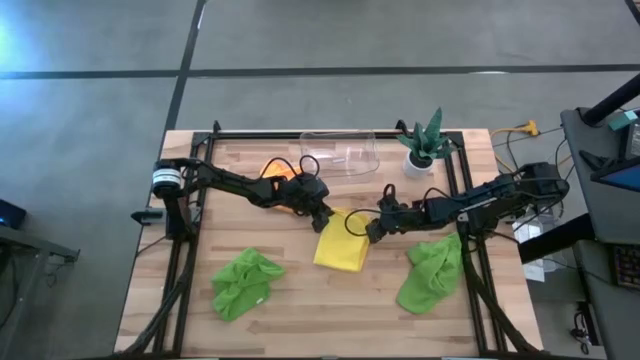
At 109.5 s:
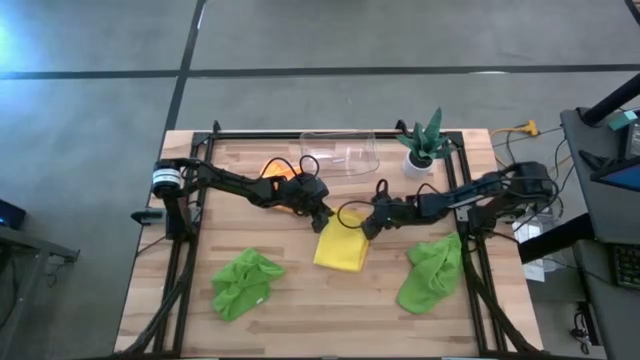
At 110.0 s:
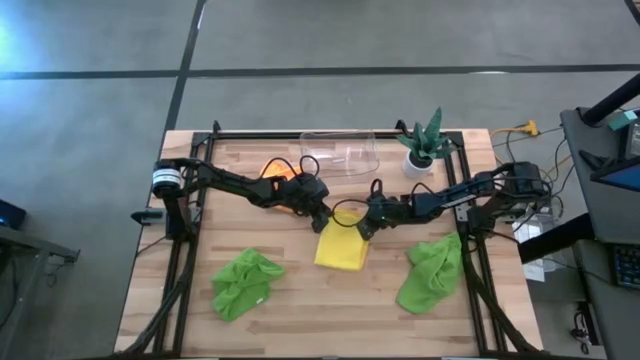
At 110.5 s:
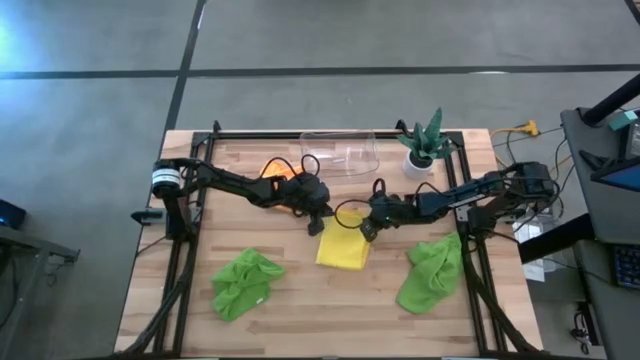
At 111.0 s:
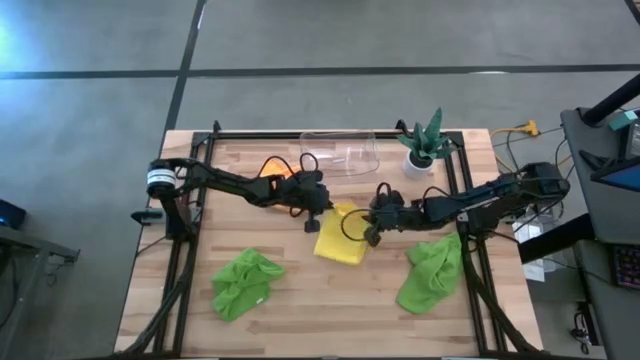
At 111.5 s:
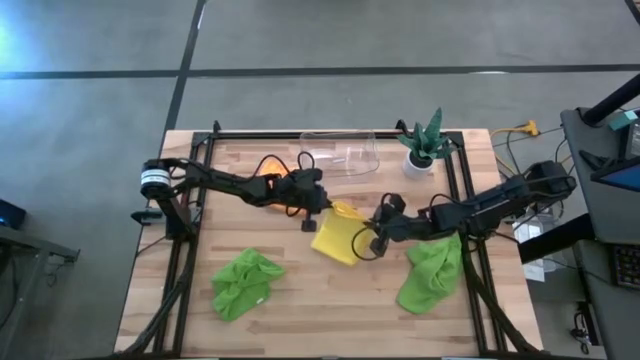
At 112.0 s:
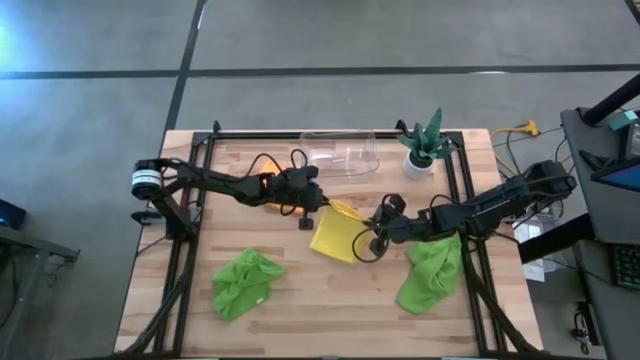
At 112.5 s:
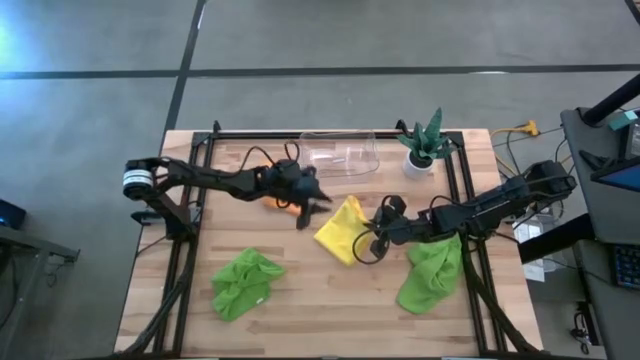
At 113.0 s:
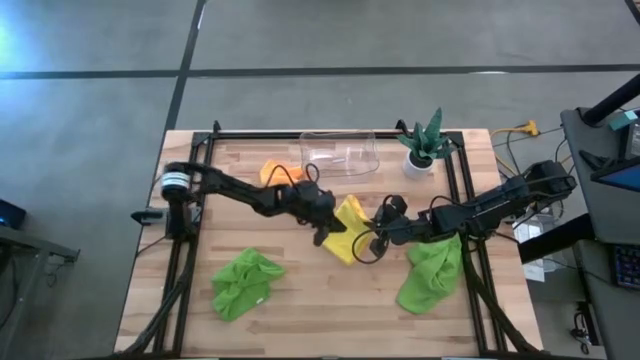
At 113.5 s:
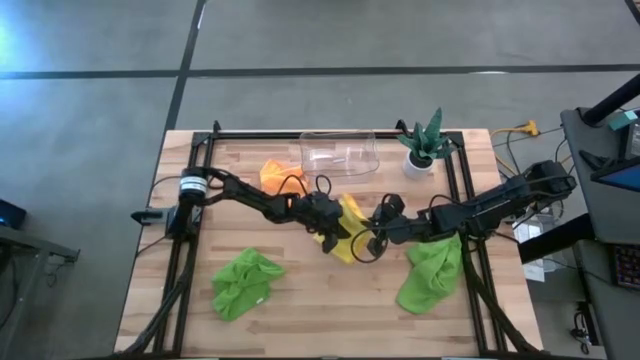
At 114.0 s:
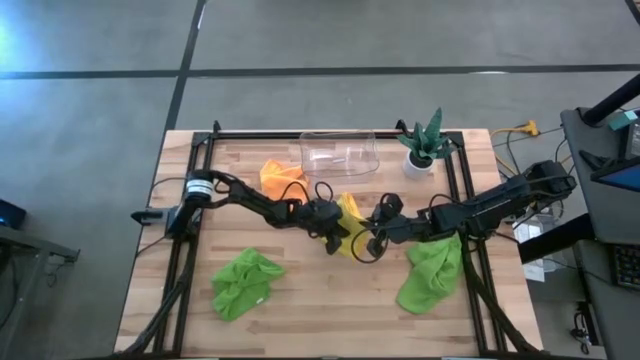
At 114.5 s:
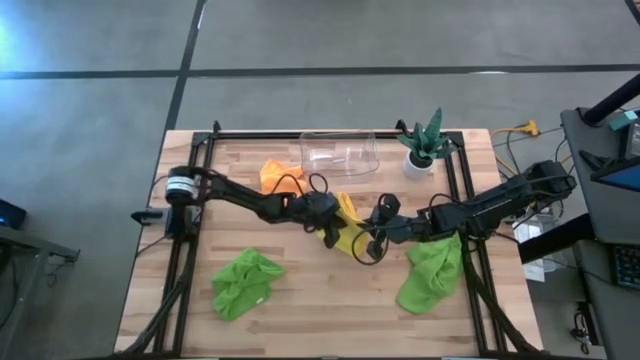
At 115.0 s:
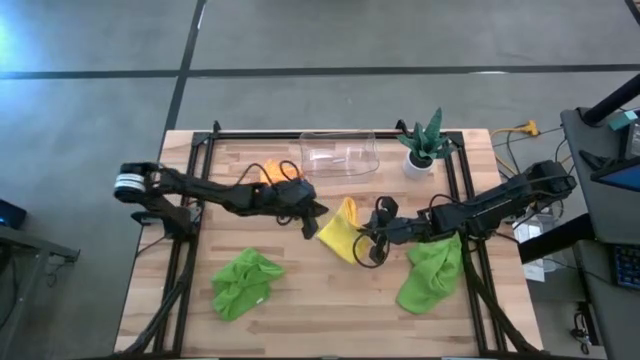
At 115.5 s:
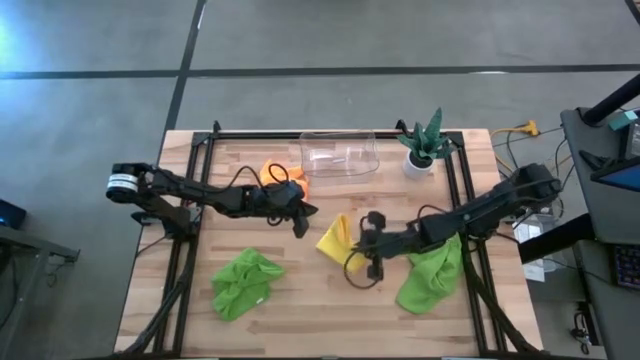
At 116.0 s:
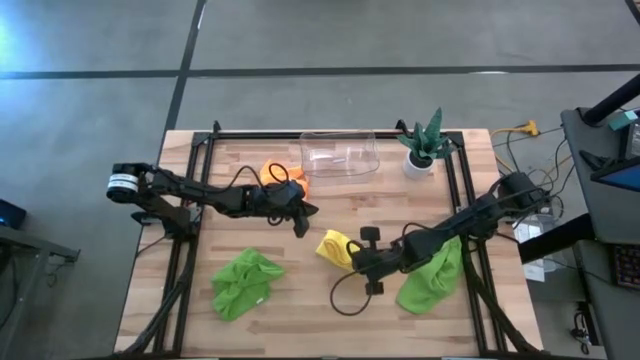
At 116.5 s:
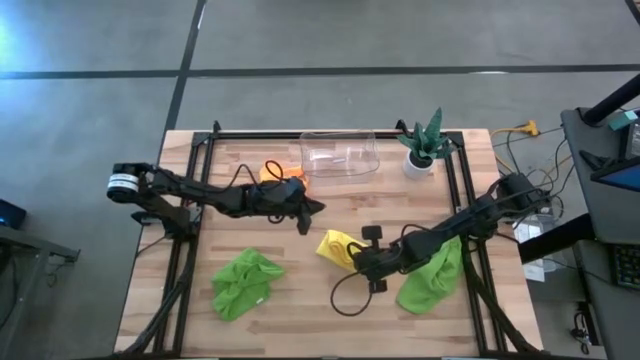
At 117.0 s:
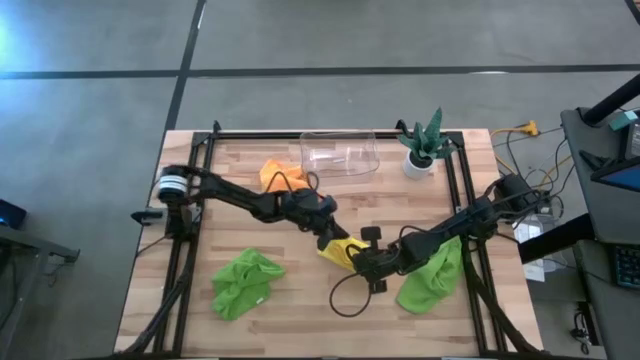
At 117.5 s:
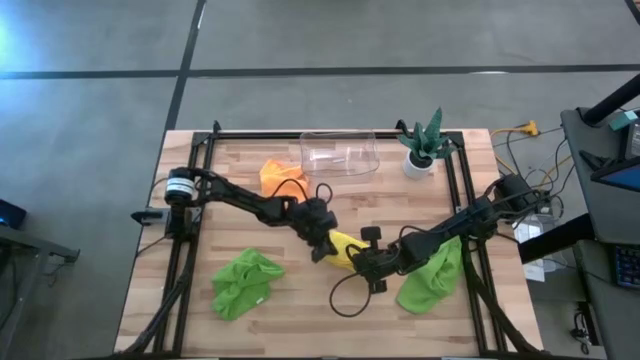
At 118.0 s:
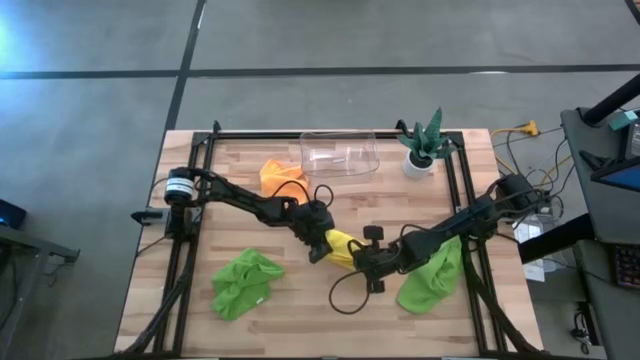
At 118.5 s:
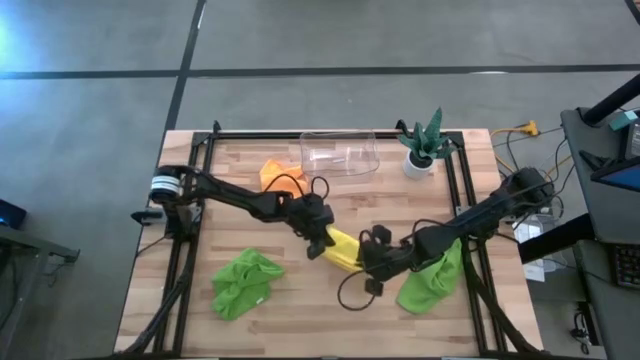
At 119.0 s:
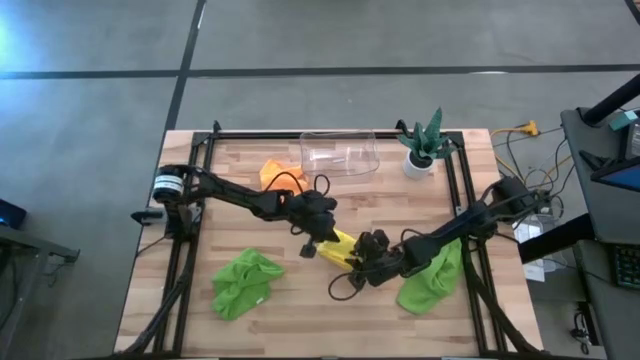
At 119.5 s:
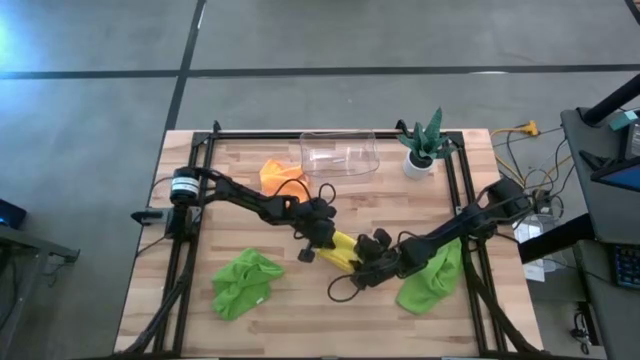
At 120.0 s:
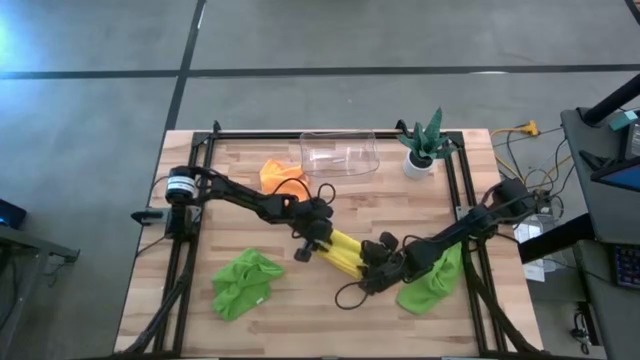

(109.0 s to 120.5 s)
Task: Fold microfiber towels
Fold the yellow microfiber towel

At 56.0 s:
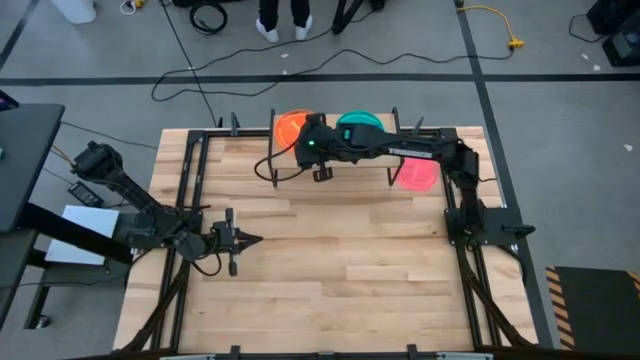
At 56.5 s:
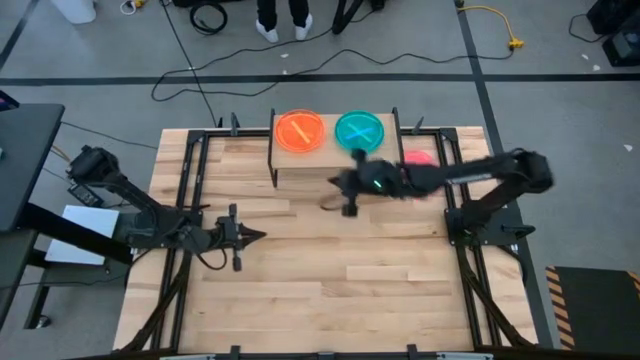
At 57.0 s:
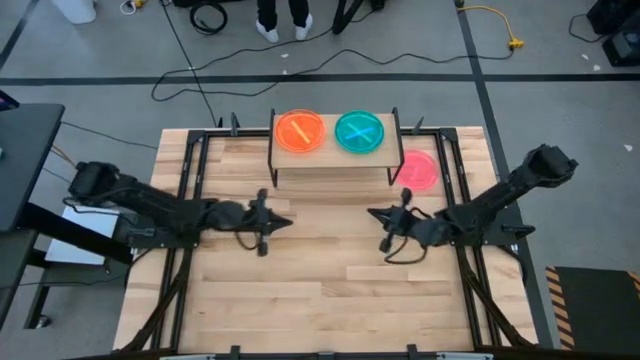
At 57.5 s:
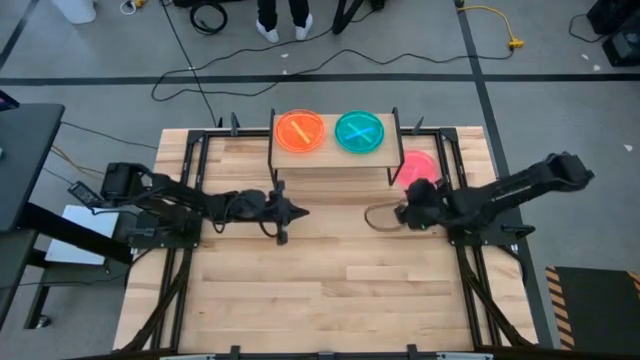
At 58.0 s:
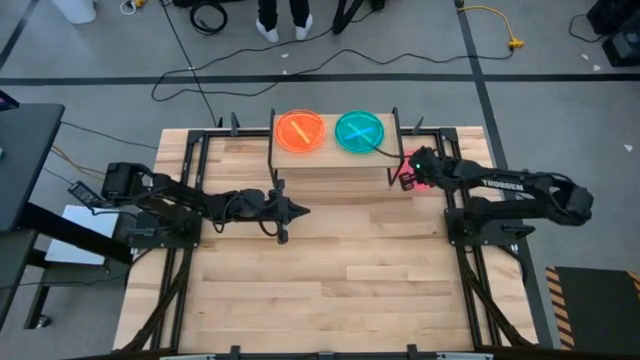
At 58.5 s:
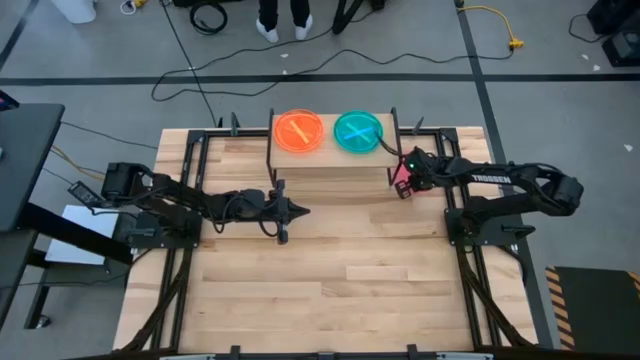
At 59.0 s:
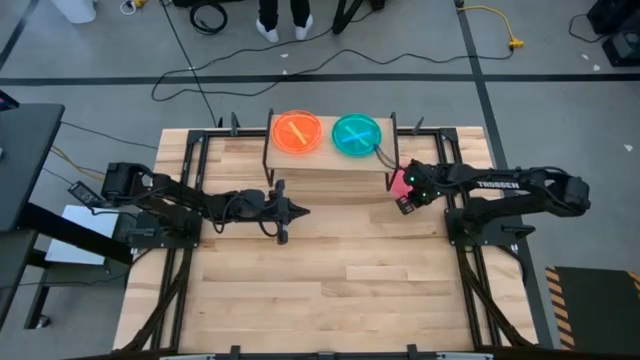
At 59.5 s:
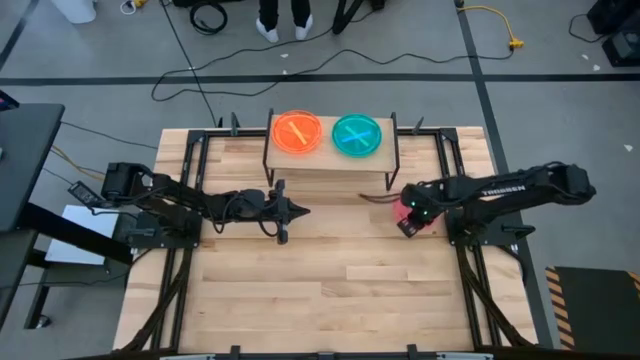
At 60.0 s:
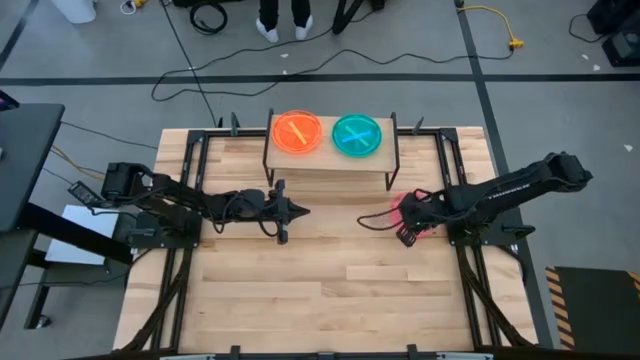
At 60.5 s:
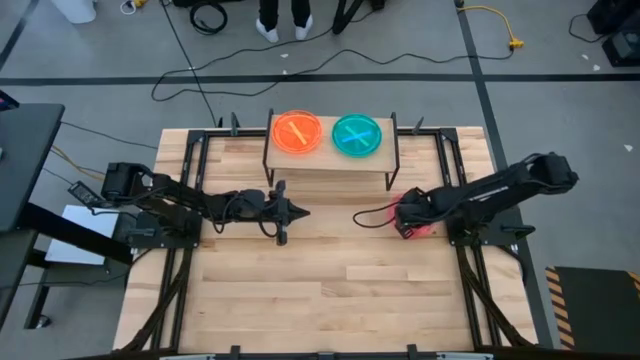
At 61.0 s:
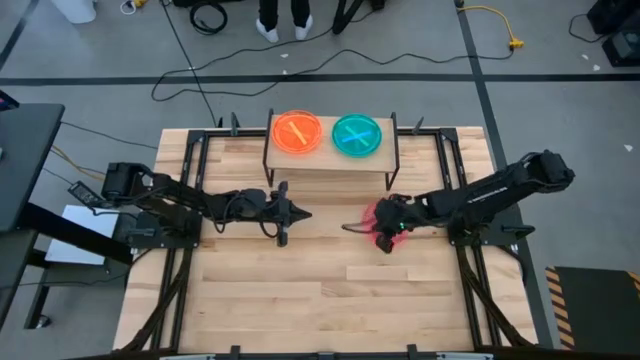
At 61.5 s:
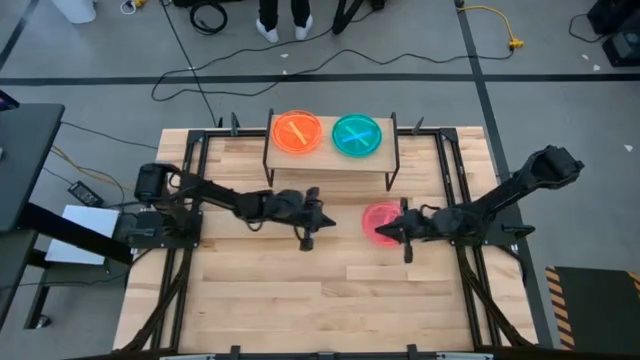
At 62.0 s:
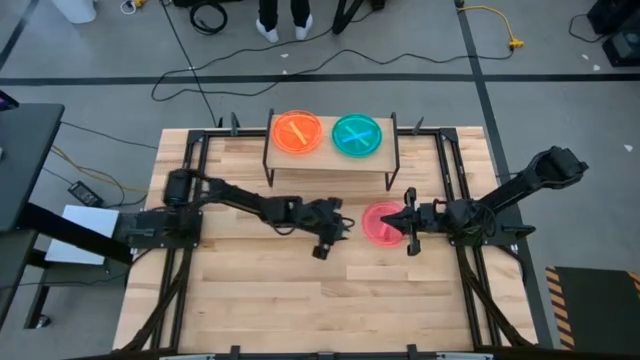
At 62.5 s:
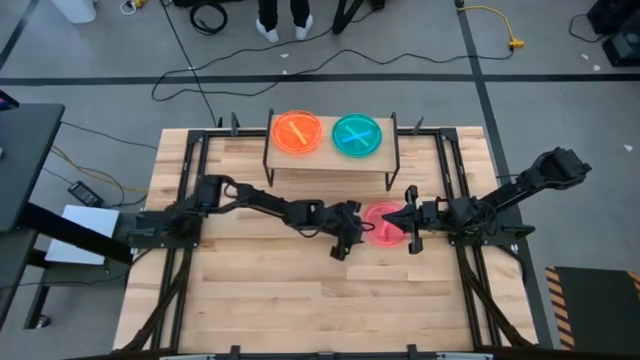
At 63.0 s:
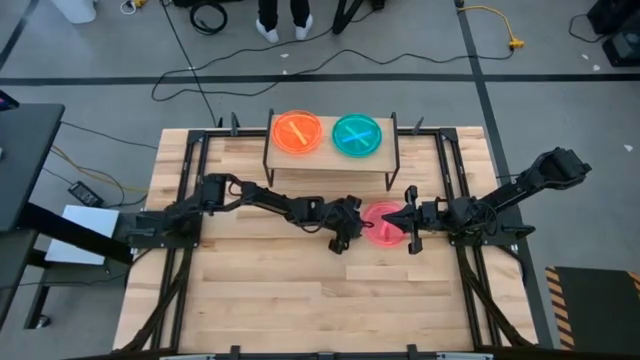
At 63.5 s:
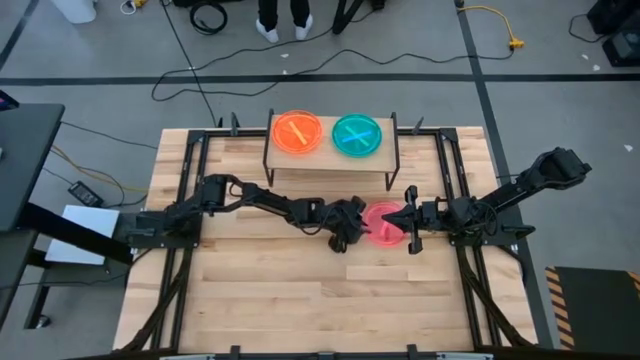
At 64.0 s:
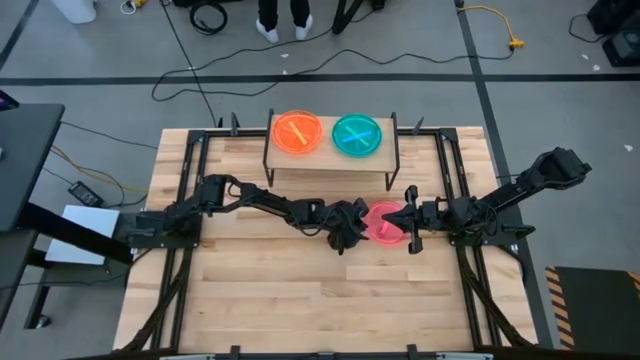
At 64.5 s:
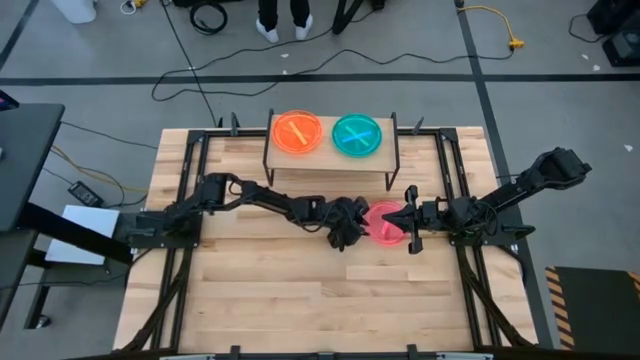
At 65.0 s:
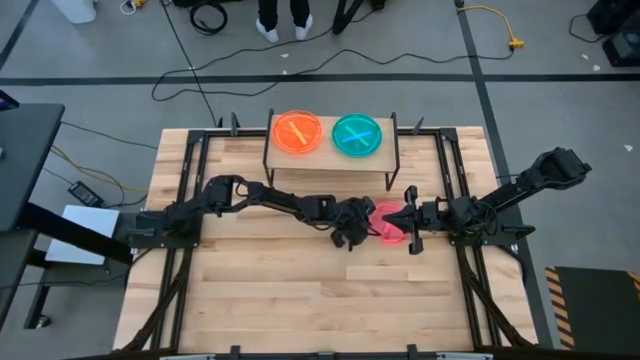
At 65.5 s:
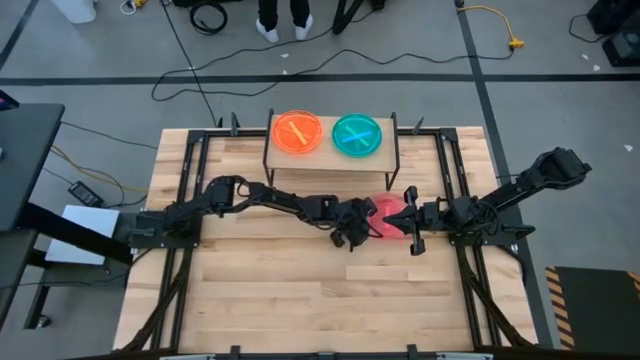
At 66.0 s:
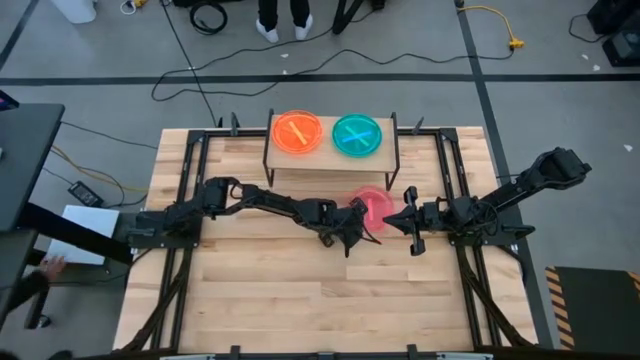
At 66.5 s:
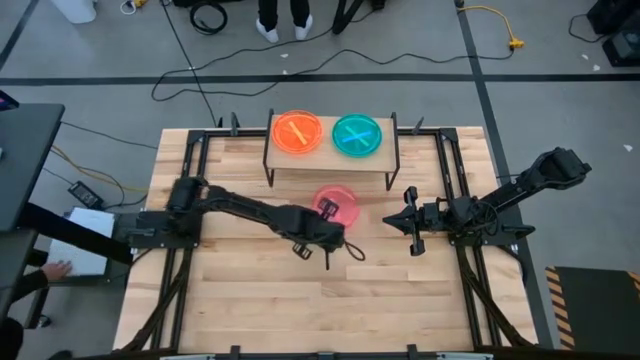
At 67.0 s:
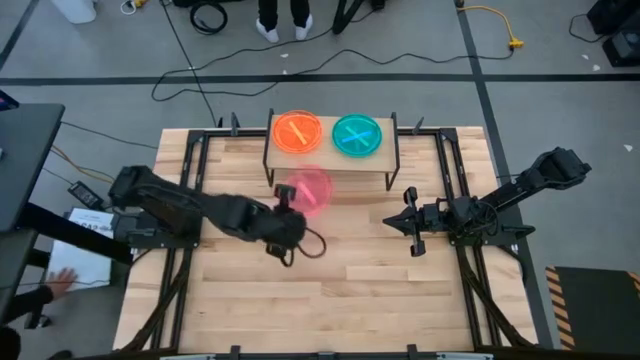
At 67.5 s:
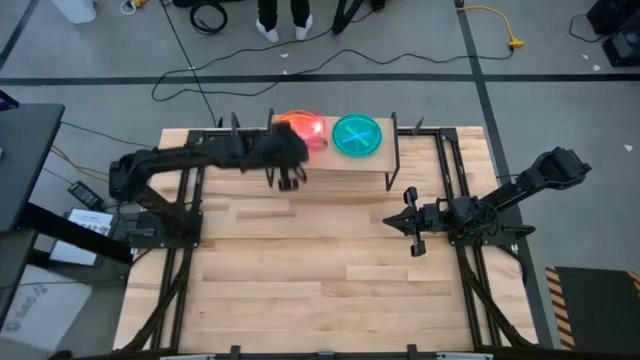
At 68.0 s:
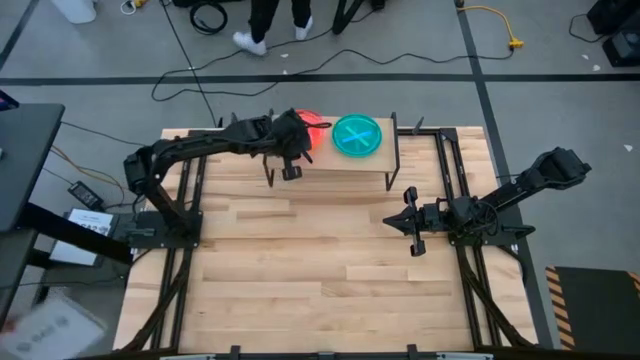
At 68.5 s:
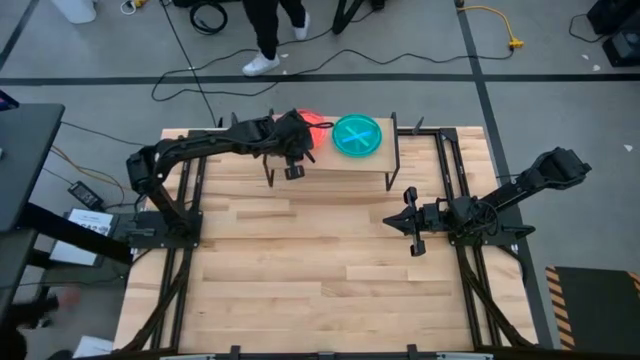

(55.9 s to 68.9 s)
Task: Place and stack plates onto a shelf
Stack the red plate on top of the orange plate on the shelf
